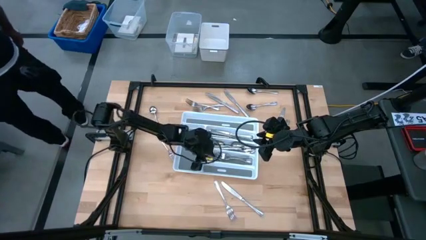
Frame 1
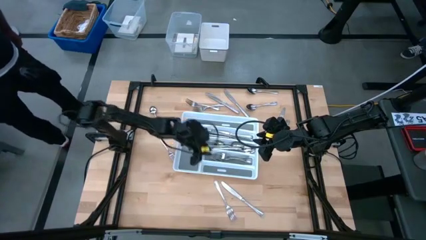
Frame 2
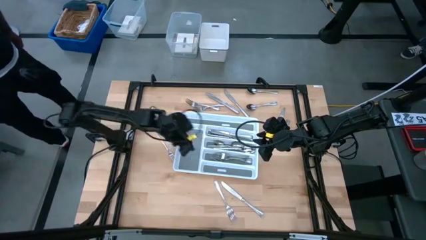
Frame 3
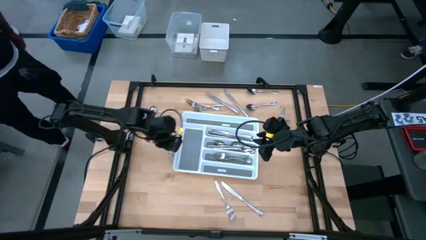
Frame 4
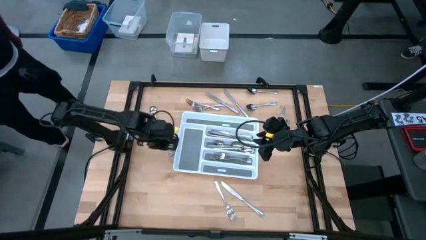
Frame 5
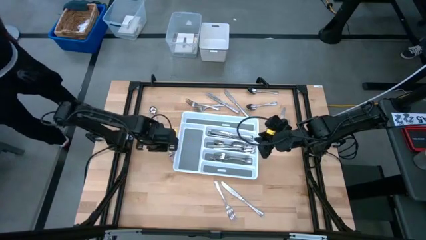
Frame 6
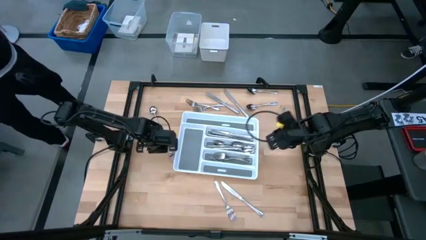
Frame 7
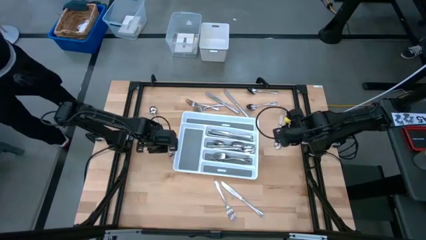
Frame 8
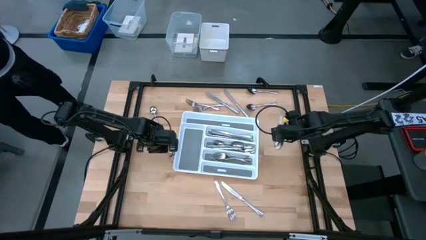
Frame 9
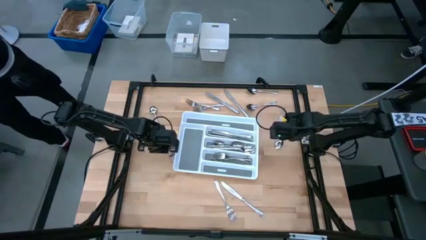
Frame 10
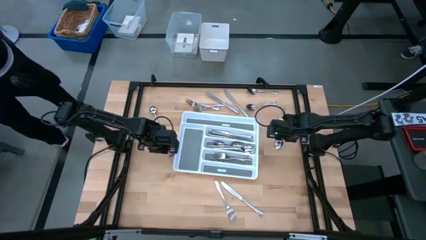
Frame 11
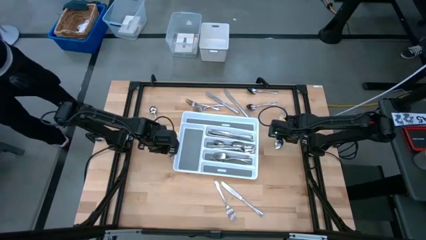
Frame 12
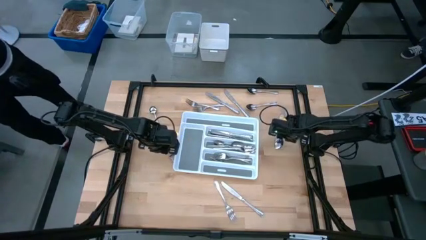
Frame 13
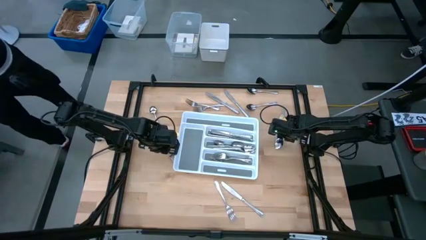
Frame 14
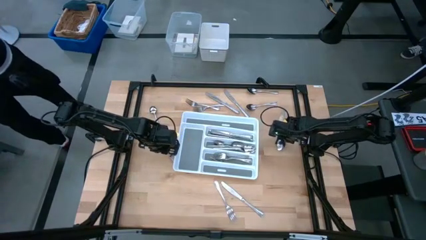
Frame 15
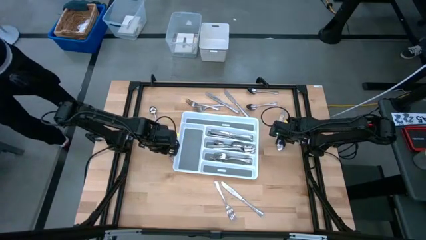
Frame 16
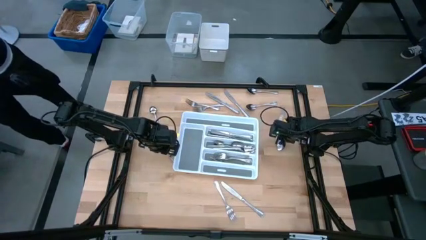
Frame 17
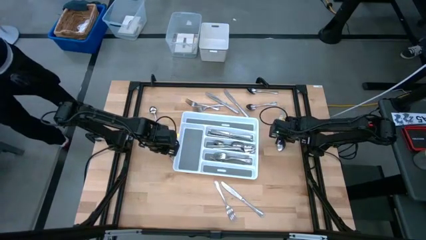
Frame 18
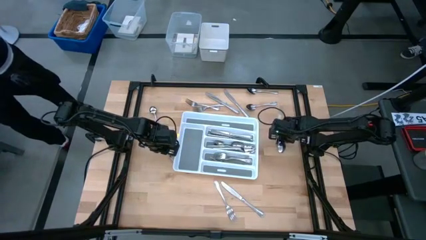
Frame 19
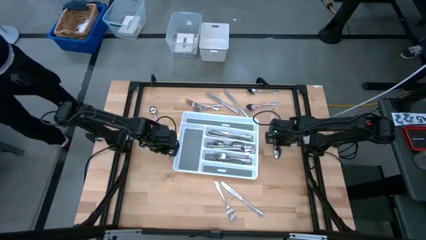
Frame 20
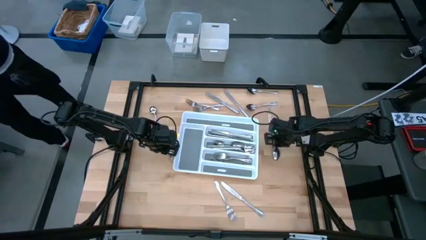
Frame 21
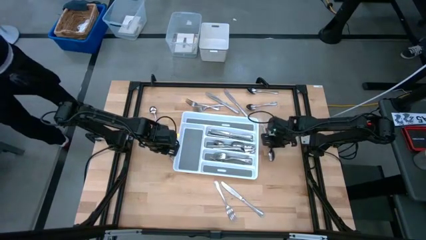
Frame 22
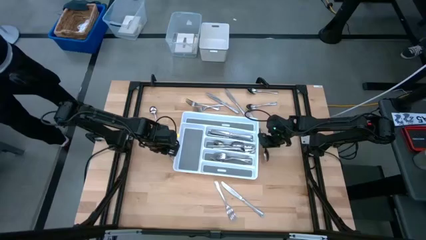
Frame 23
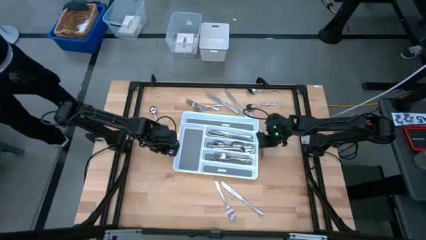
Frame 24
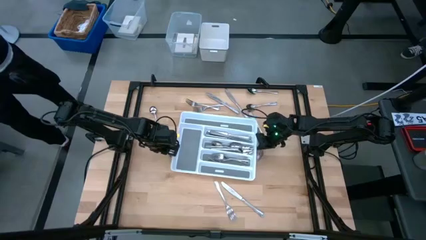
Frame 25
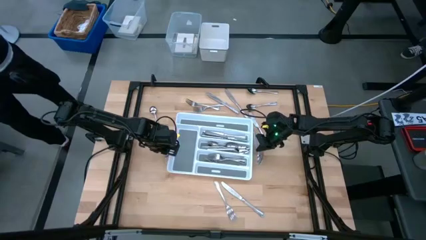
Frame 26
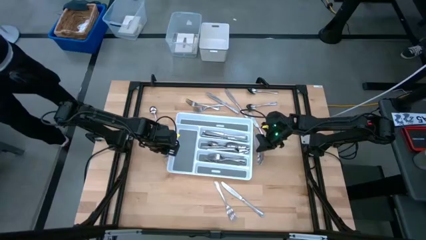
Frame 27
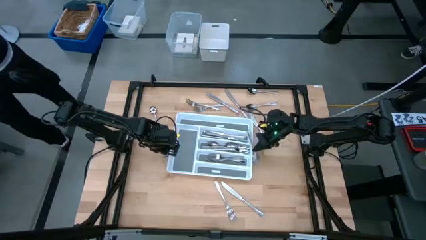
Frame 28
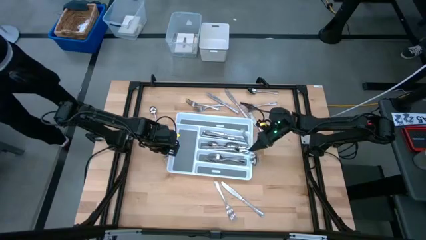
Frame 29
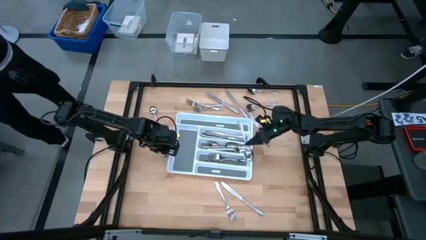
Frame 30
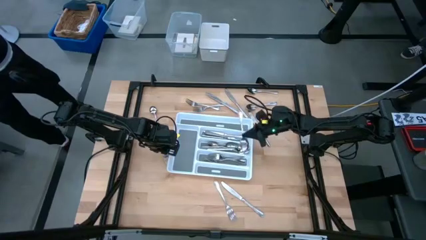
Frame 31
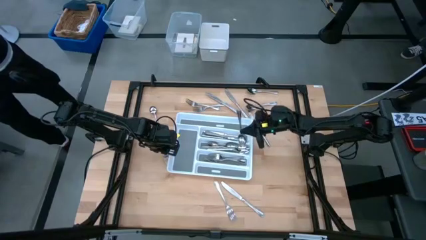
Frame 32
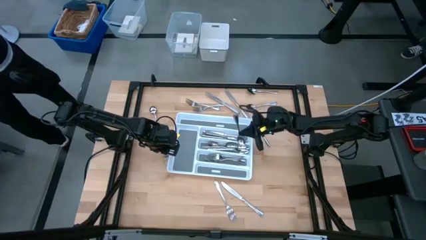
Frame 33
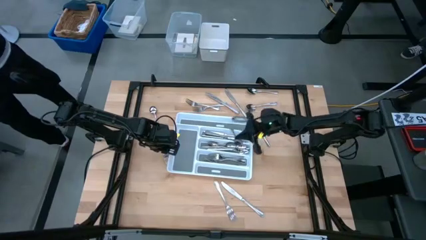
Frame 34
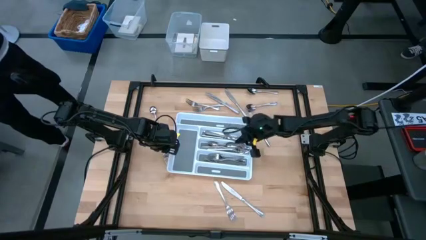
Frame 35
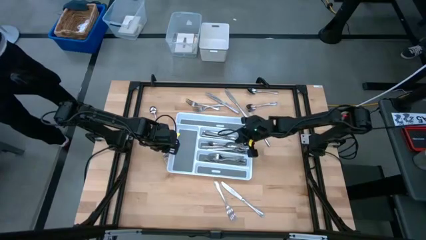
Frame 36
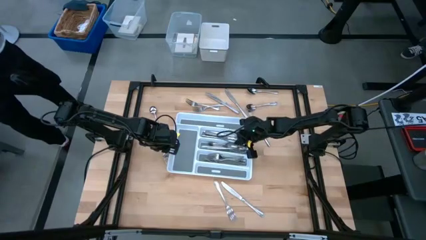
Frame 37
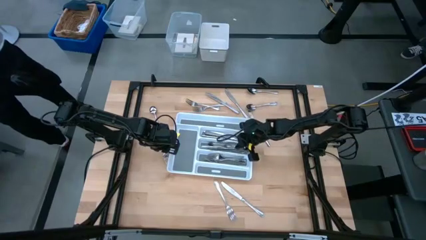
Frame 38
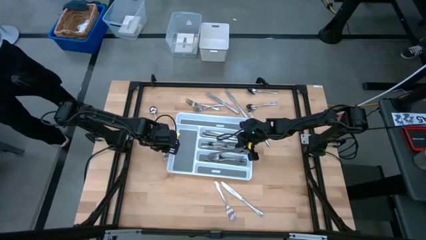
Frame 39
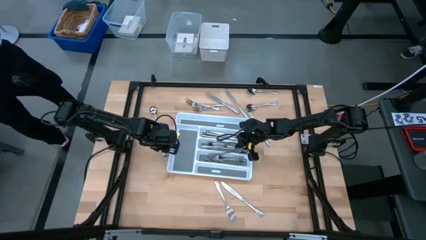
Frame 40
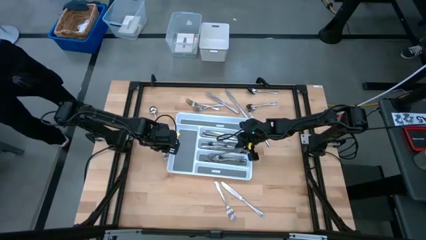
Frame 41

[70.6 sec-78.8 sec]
Task: Sort silverware
Put the spoon into the organizer tray

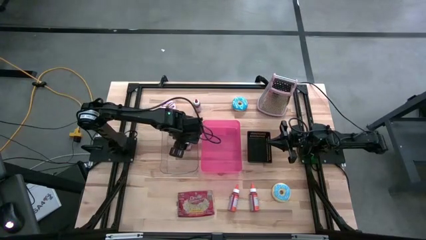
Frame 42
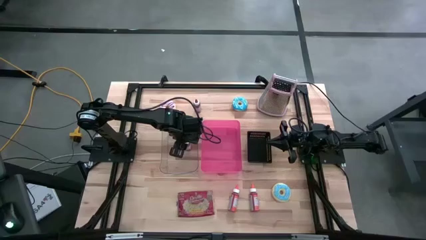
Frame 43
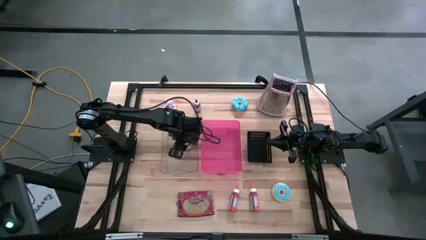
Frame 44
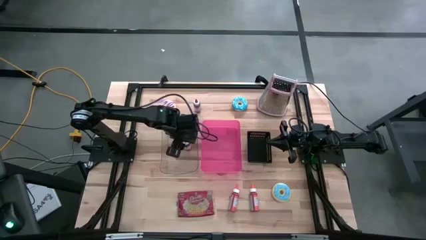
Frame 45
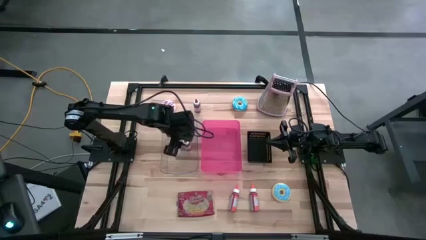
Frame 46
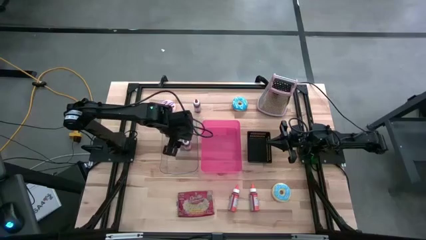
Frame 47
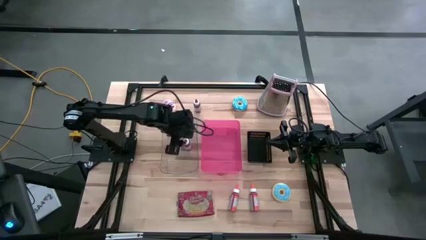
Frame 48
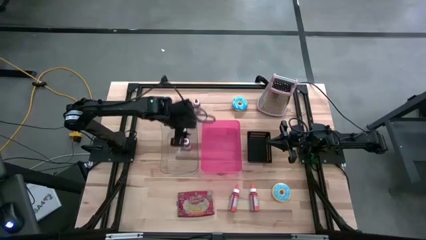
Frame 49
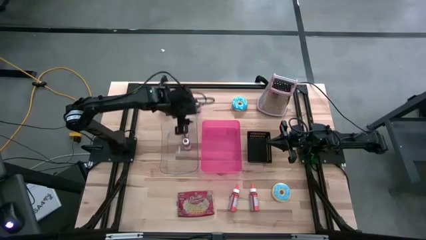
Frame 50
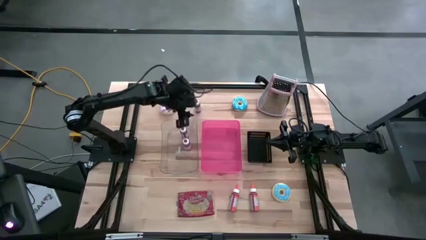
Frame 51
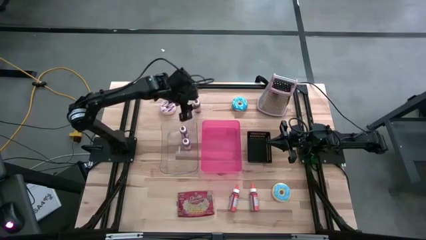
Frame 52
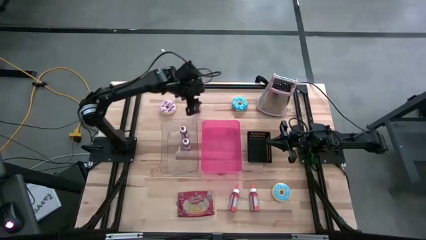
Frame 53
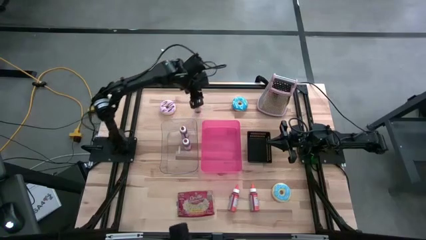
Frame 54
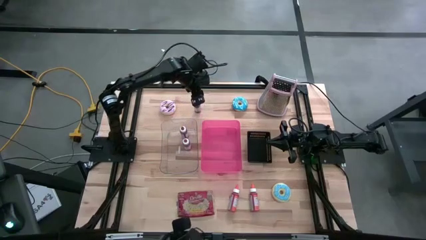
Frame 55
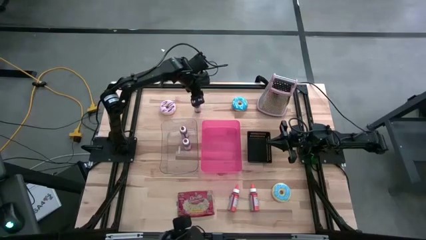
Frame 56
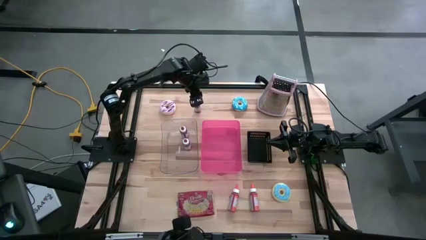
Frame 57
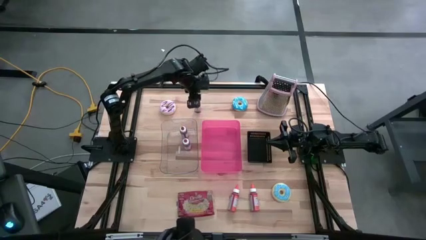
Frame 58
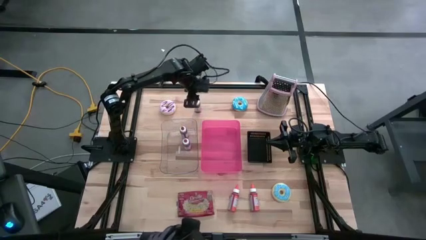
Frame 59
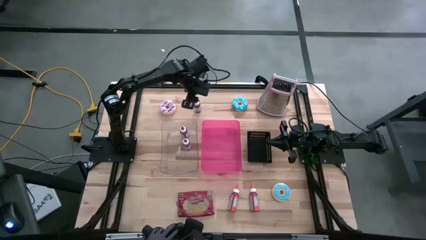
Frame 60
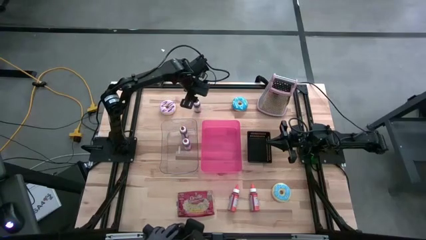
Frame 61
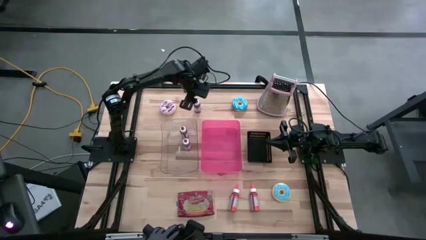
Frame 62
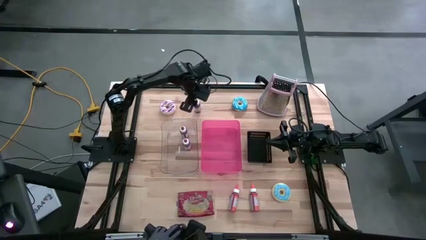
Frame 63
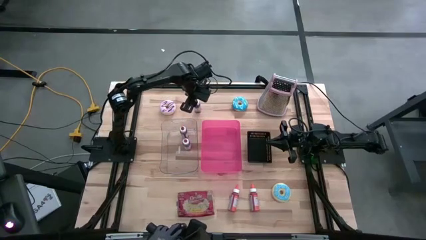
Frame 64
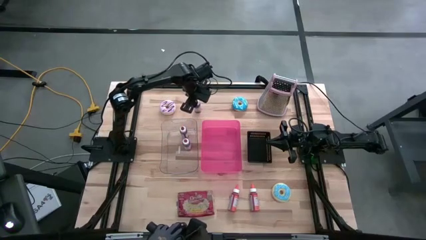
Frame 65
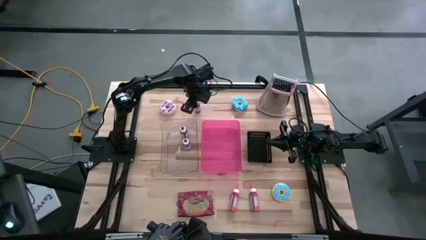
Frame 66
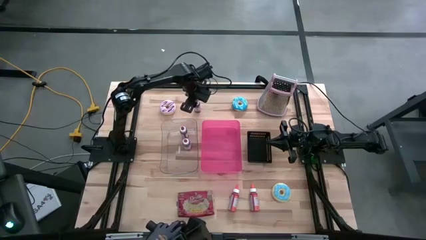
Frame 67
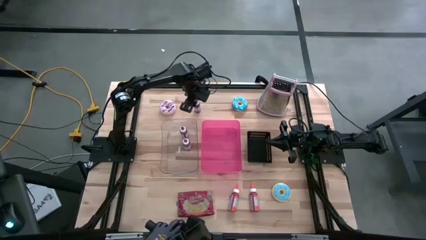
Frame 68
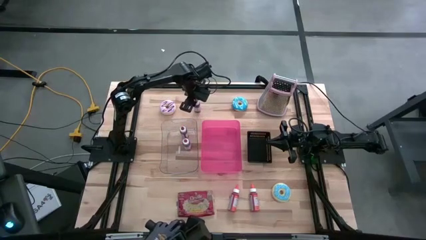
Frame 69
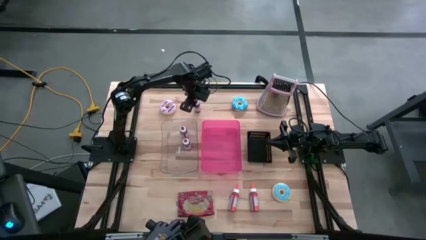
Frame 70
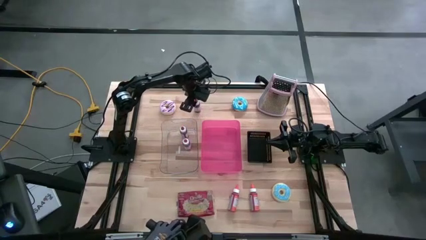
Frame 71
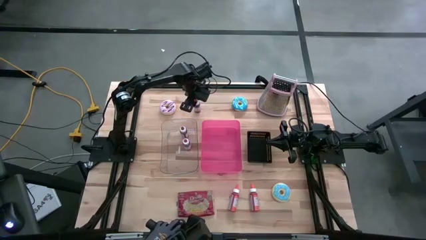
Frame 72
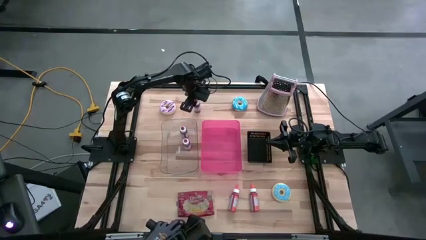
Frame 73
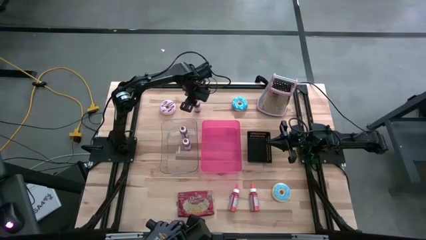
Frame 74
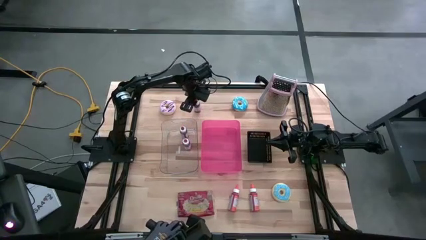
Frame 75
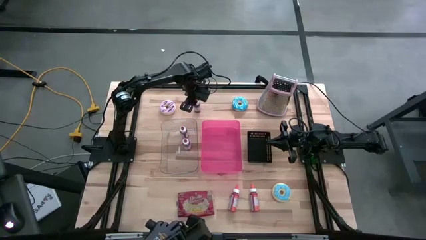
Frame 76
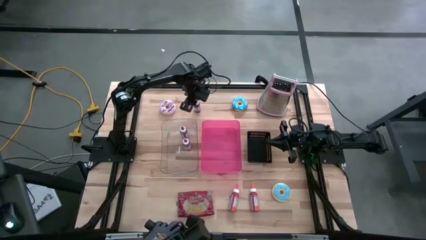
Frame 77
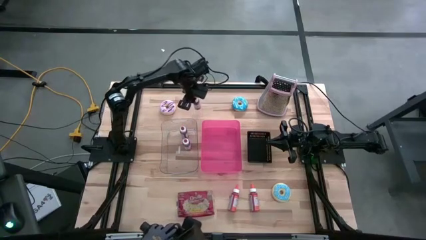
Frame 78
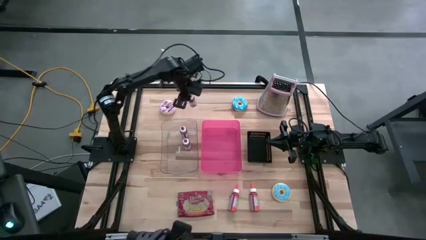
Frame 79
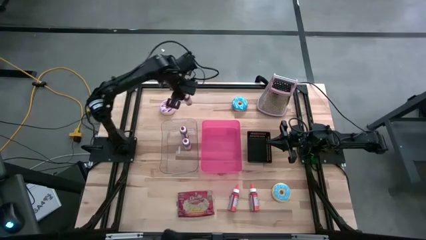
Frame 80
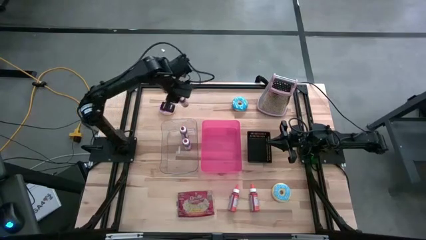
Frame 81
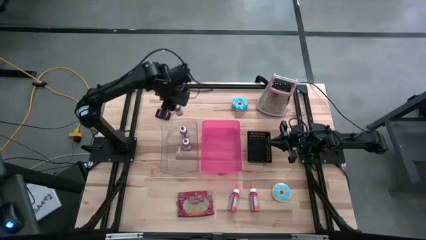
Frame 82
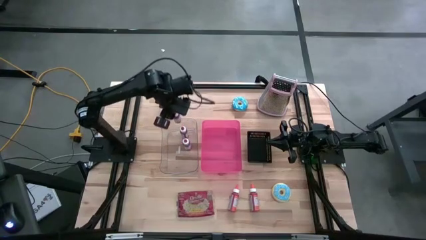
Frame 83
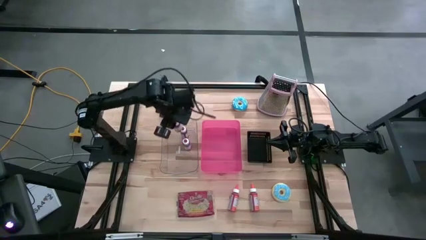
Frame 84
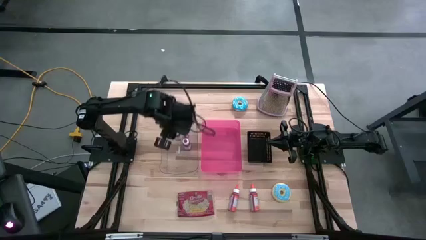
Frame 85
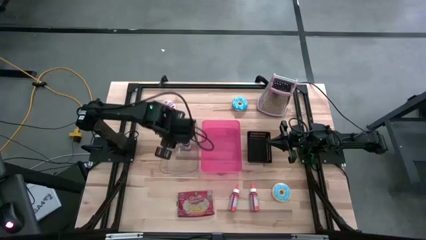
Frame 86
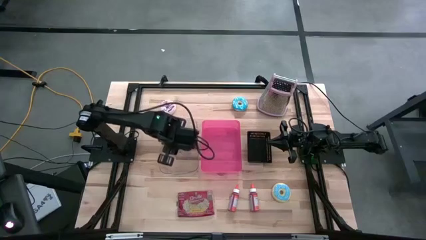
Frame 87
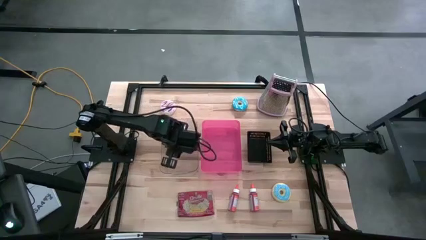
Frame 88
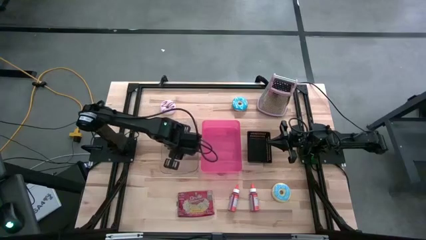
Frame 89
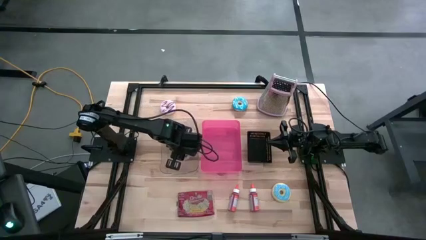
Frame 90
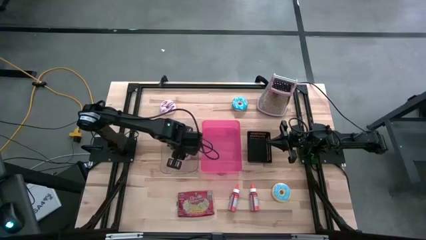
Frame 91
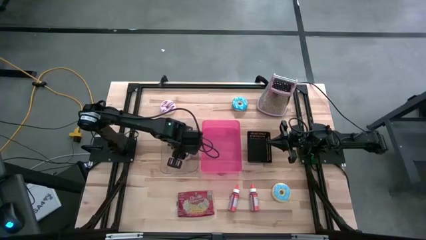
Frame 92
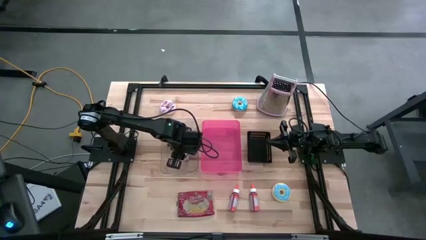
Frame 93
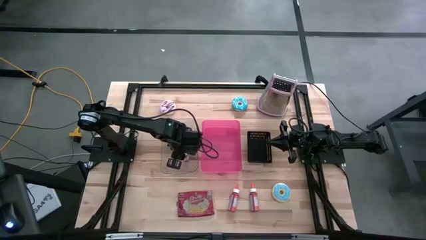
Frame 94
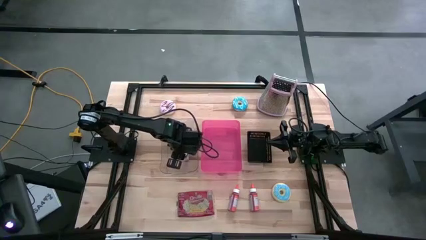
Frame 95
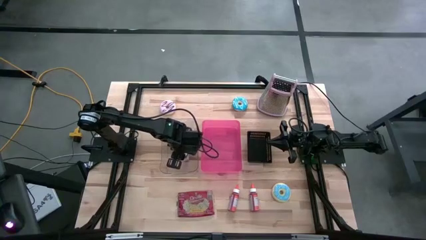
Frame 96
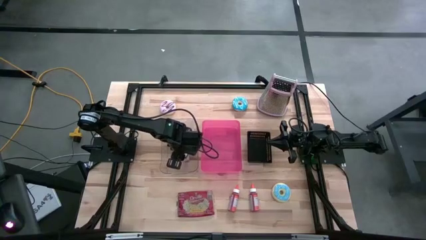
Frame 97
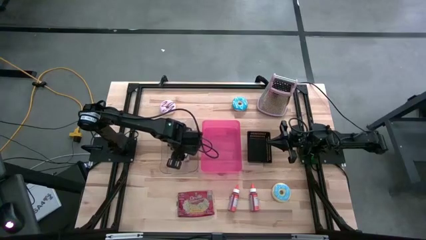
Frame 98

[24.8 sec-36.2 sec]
Task: Pick & Place Food Item
Put the red food coloring bottle into the transparent bin
